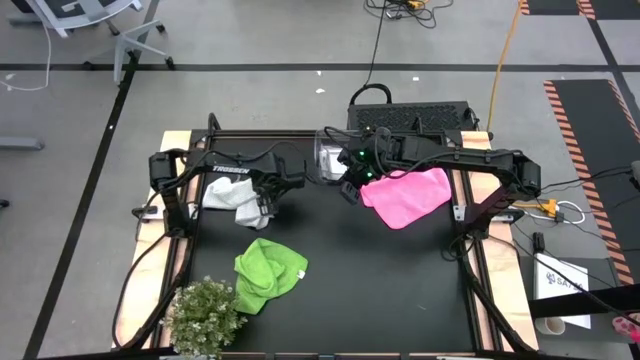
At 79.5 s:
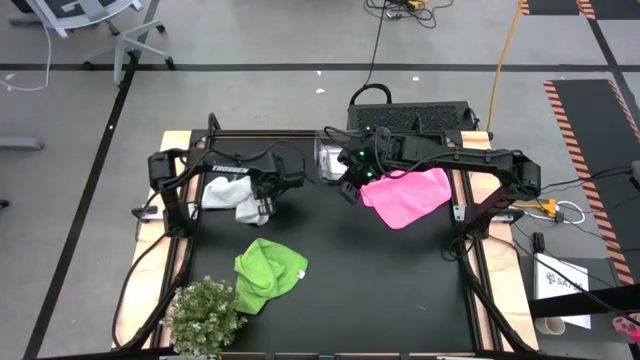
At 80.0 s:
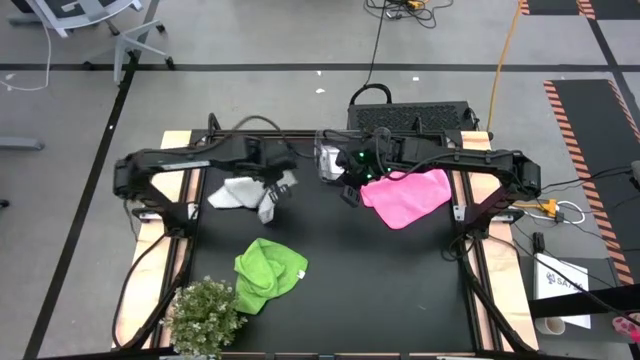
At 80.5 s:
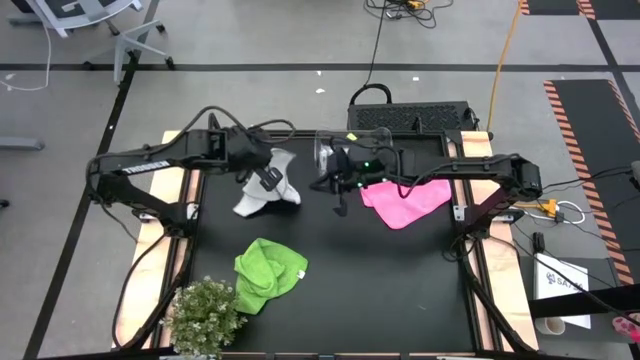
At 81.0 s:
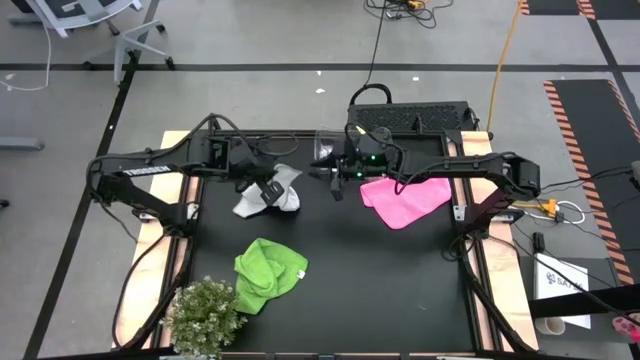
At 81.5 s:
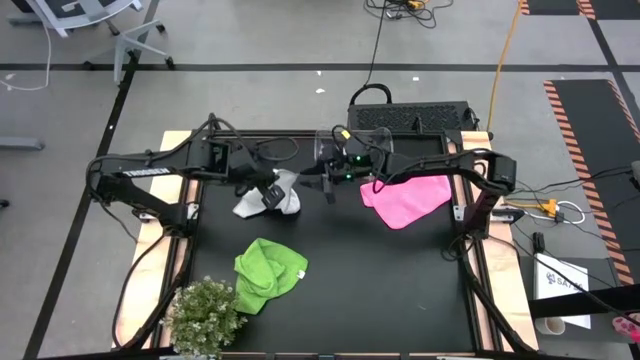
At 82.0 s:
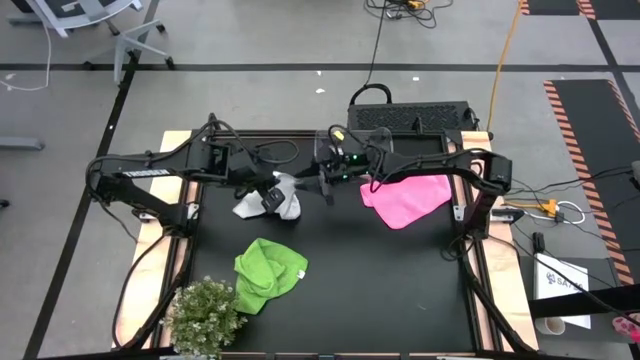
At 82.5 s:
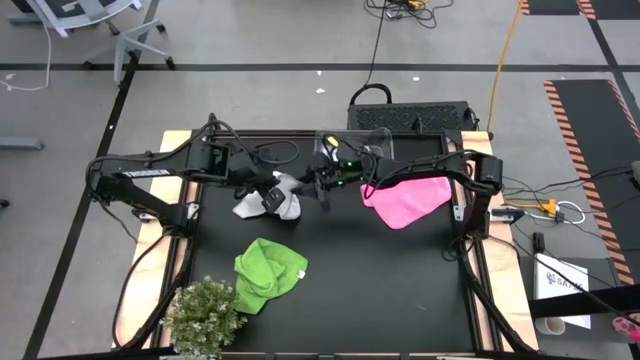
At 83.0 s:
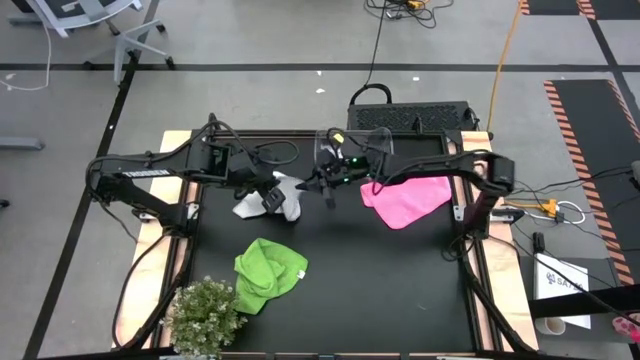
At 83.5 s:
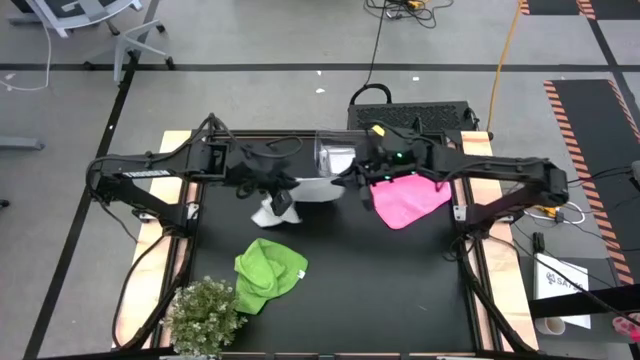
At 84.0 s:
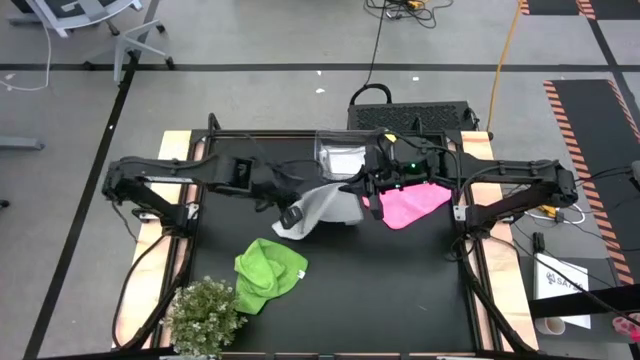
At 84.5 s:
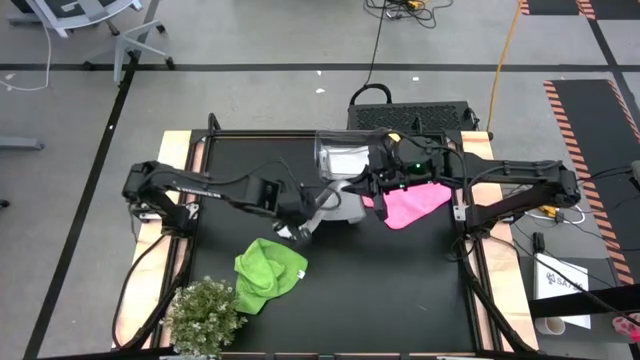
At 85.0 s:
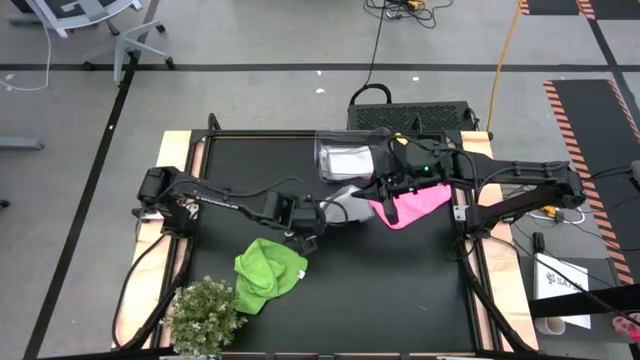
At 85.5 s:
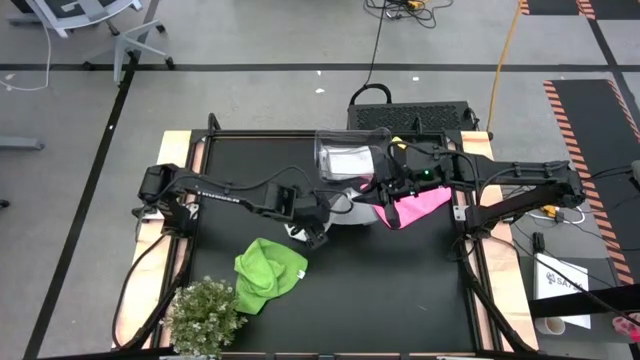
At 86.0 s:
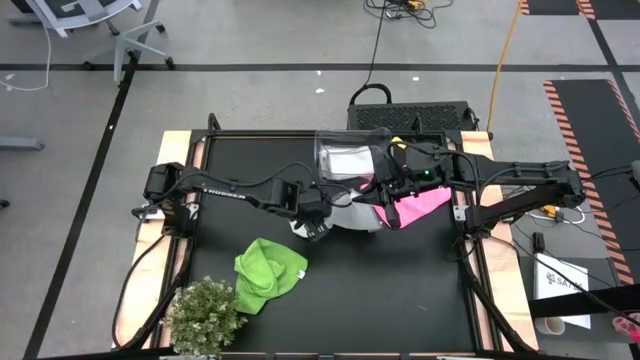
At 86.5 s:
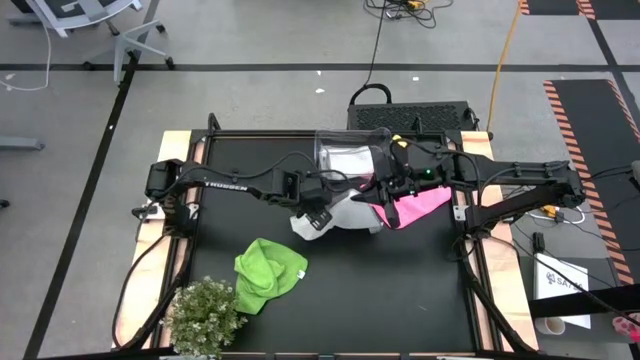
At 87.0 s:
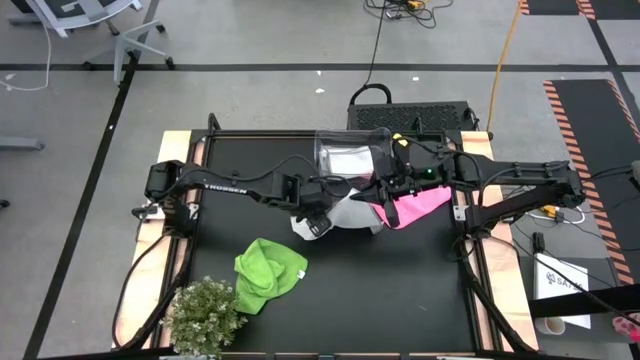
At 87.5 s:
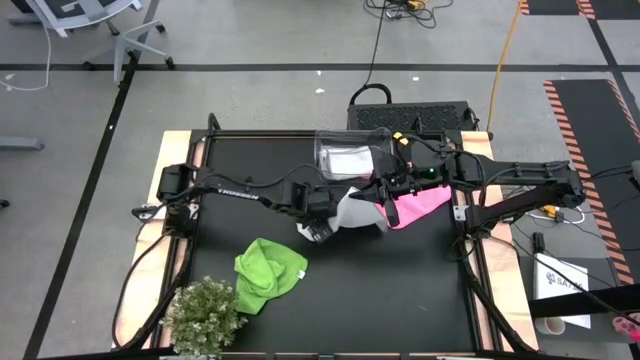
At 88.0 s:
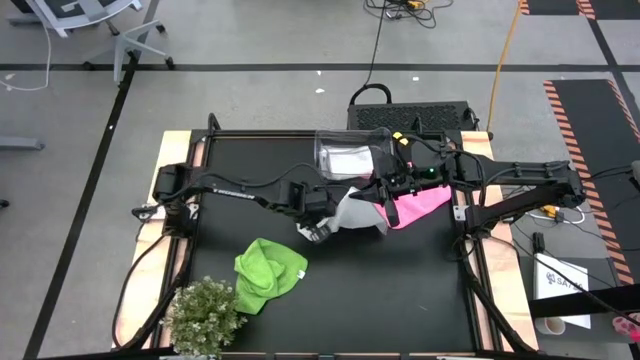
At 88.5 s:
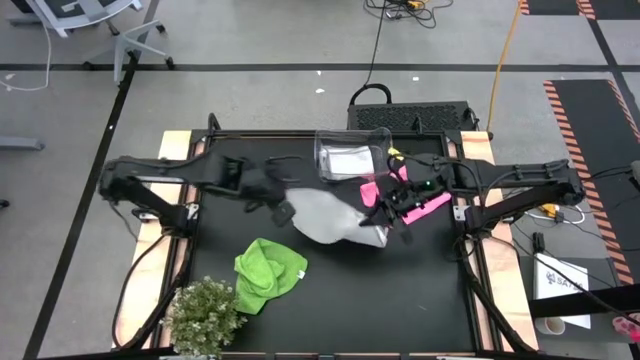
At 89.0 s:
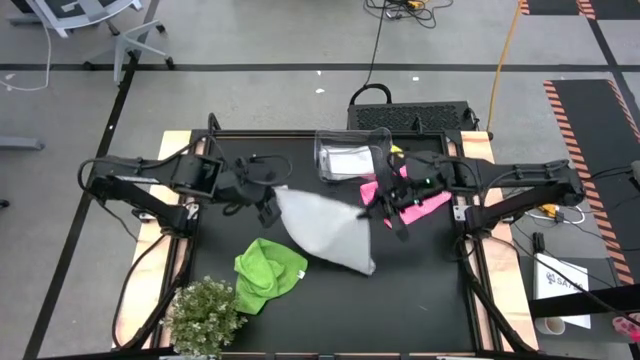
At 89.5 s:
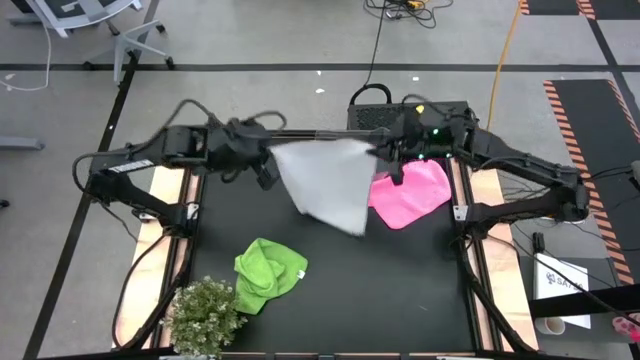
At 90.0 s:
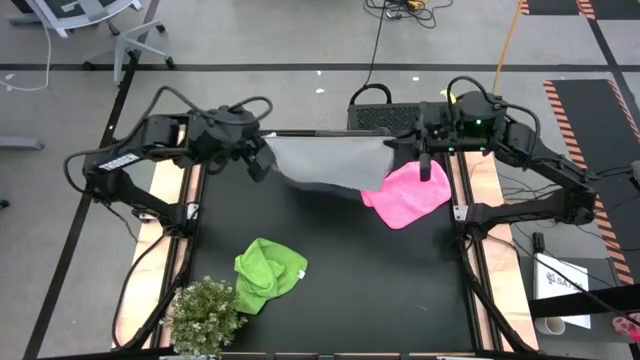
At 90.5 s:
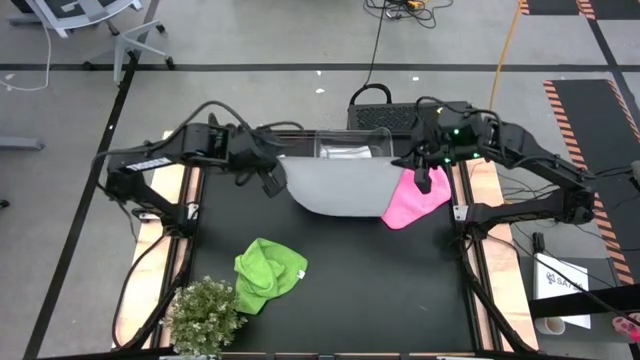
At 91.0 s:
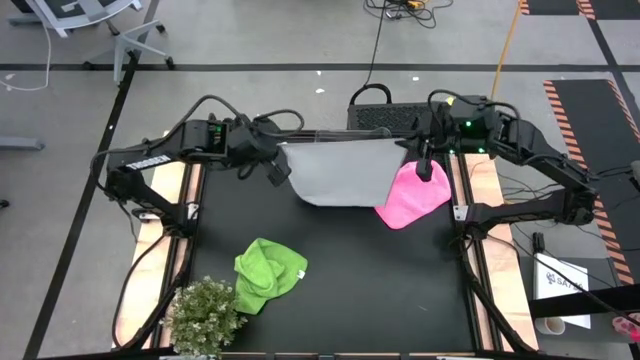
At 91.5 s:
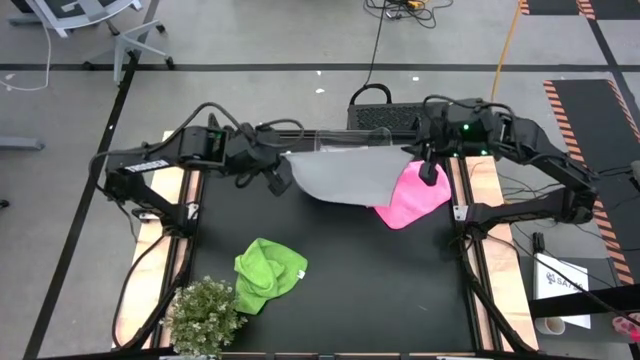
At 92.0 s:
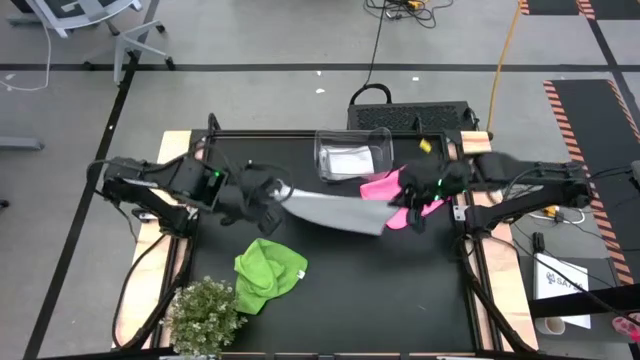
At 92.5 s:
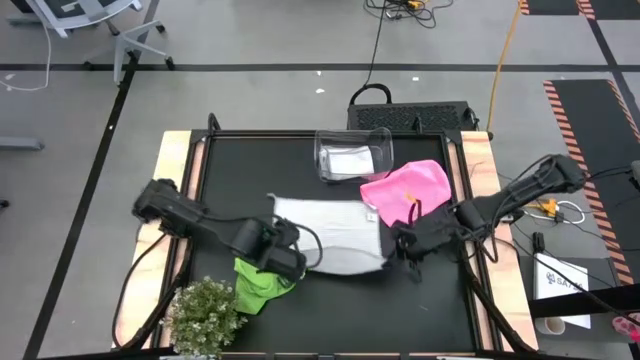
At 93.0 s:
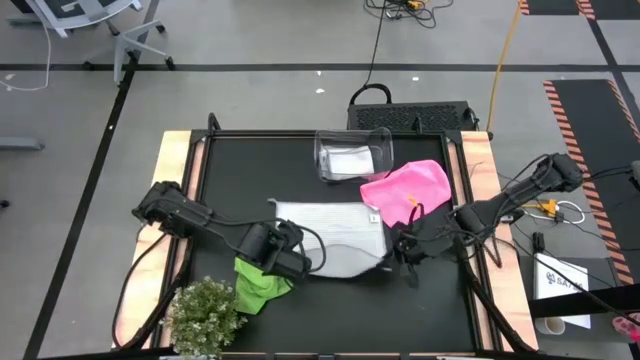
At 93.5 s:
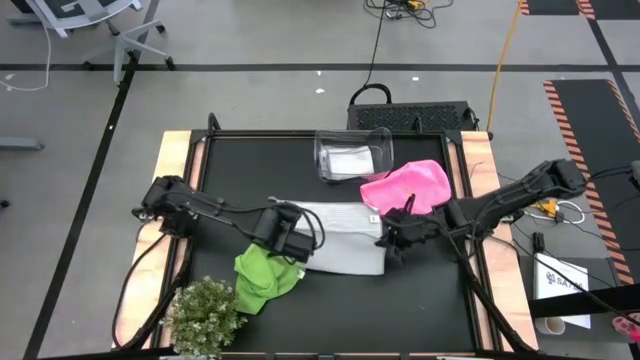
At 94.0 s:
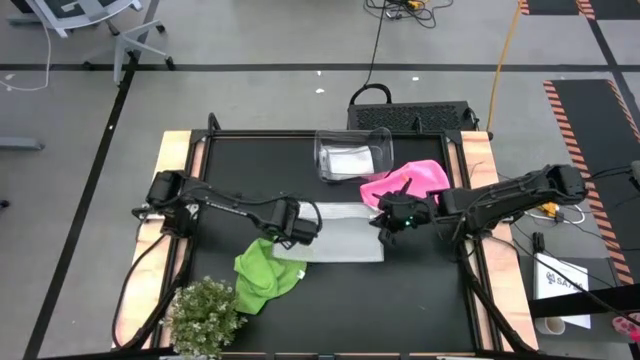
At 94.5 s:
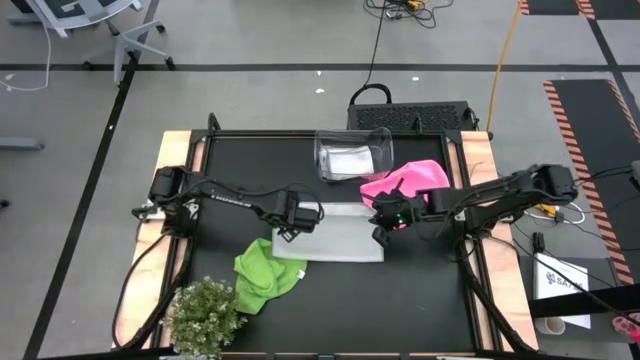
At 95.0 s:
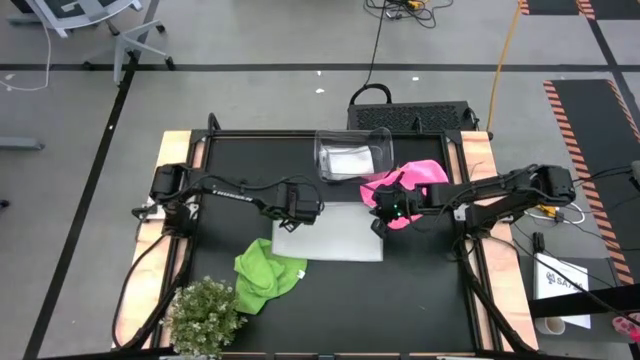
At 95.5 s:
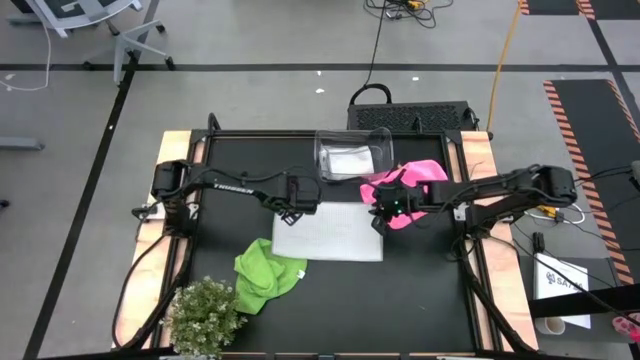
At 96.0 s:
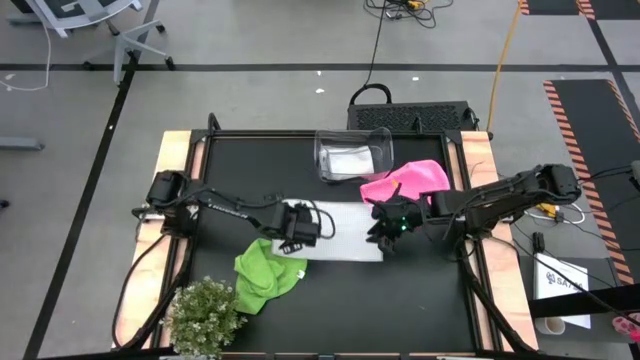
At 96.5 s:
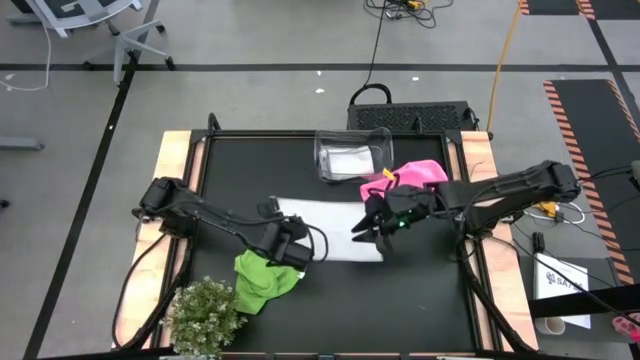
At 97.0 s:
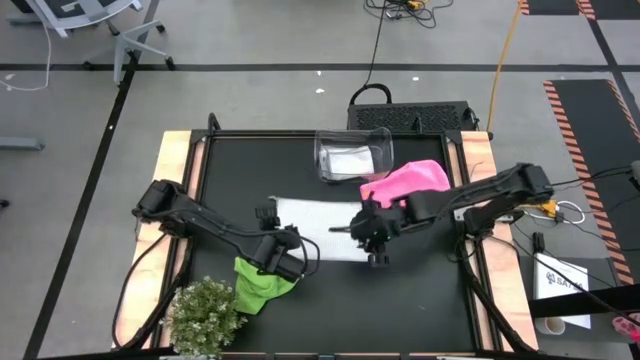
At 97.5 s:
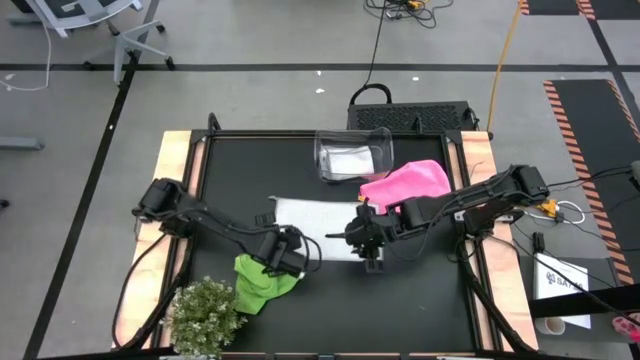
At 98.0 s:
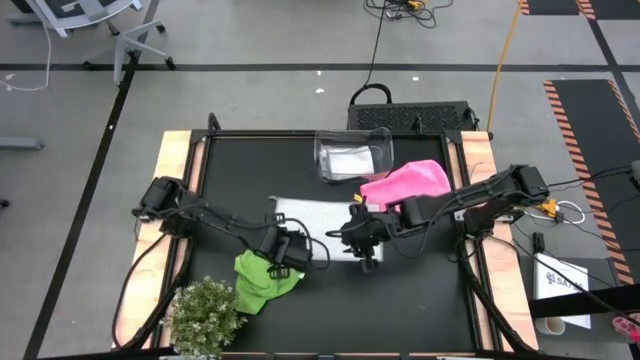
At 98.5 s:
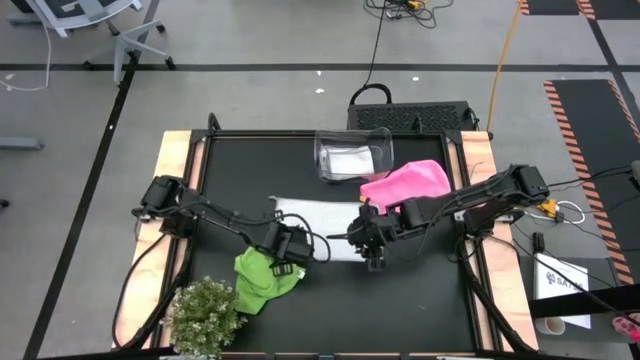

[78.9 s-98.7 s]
Task: Fold microfiber towels
Fold the gray microfiber cloth

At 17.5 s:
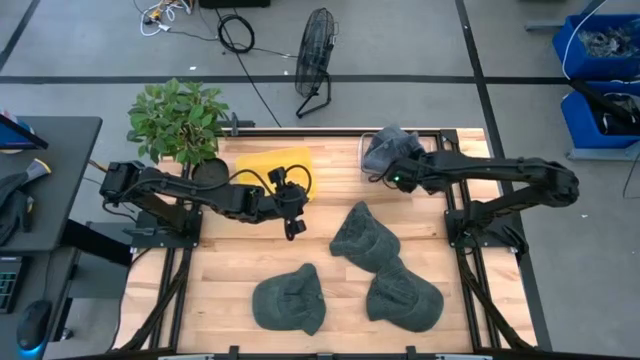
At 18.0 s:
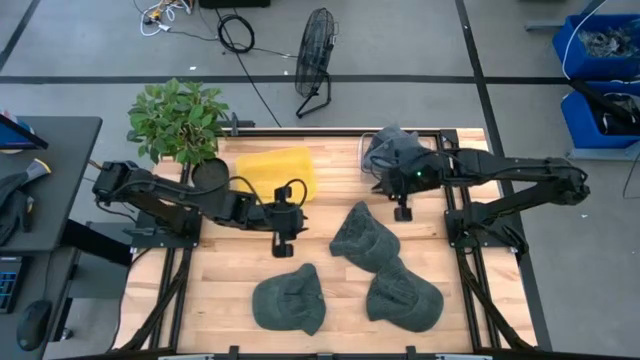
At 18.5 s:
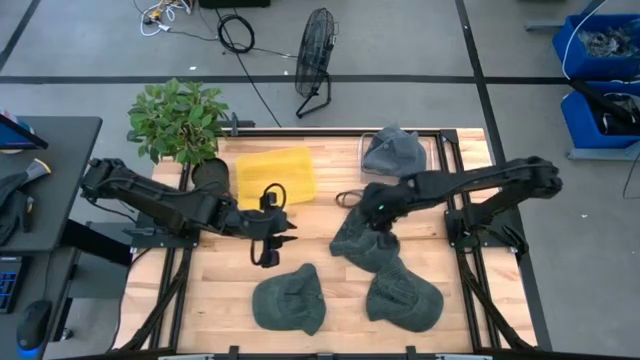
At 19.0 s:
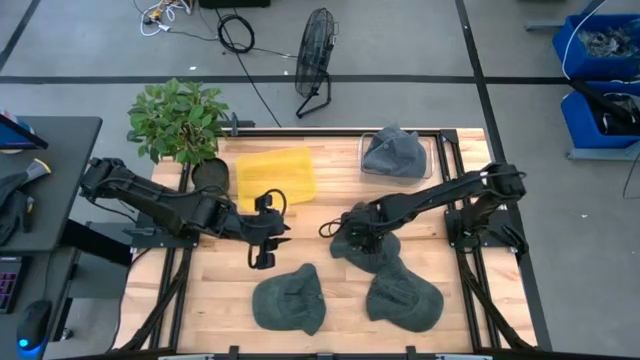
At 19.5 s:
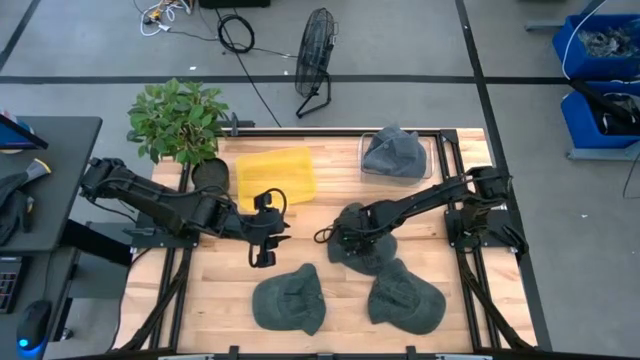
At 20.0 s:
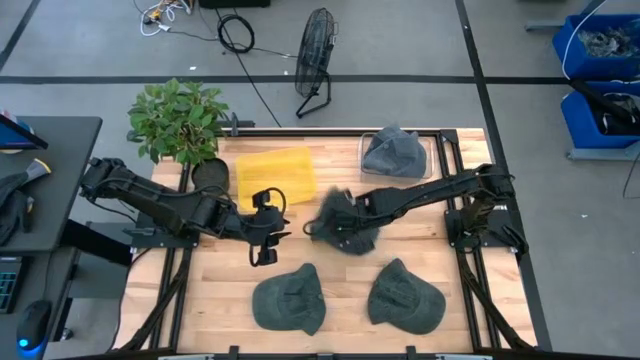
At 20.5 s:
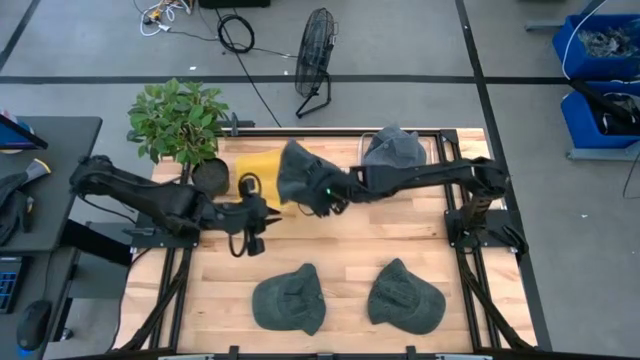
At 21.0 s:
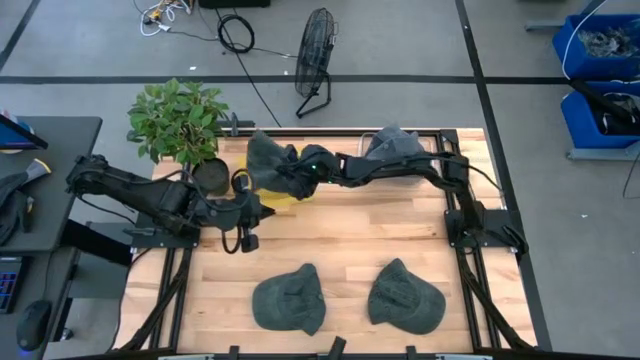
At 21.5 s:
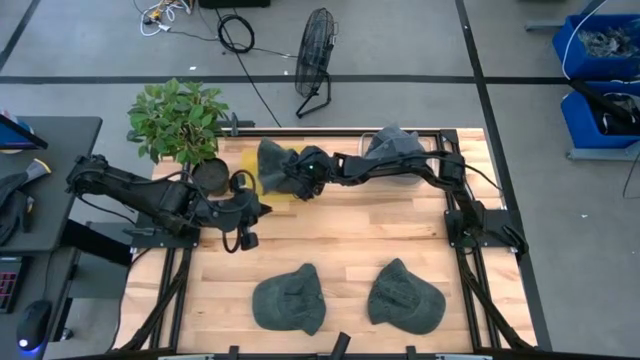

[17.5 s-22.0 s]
Task: Pick & Place hat
Put the top right black cap into the yellow bin
